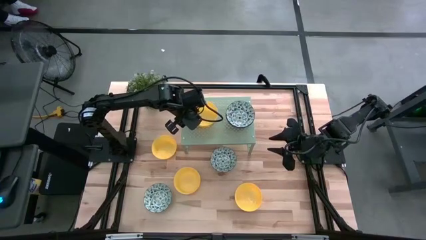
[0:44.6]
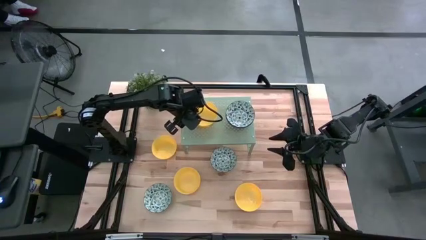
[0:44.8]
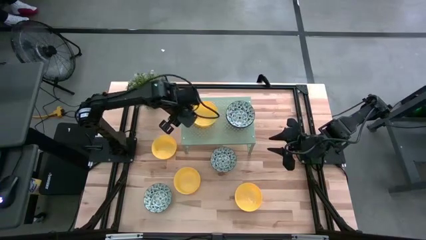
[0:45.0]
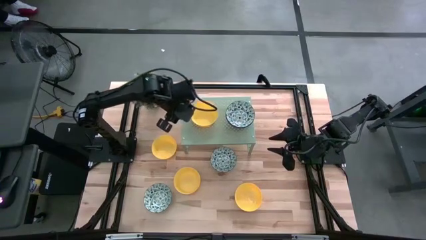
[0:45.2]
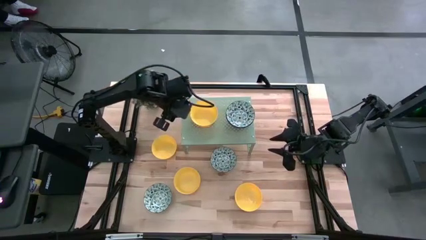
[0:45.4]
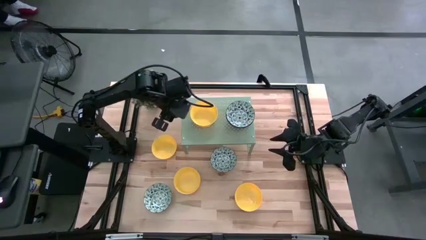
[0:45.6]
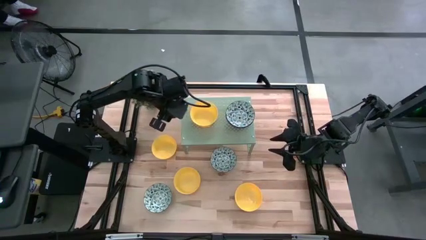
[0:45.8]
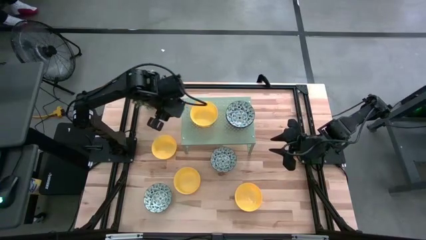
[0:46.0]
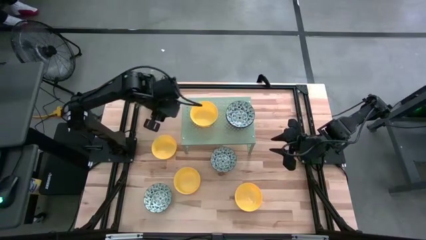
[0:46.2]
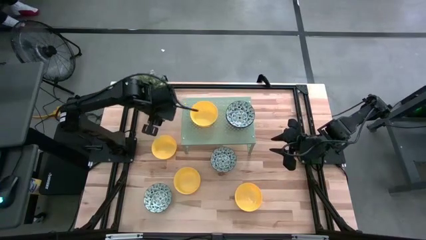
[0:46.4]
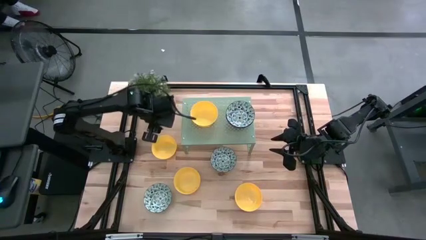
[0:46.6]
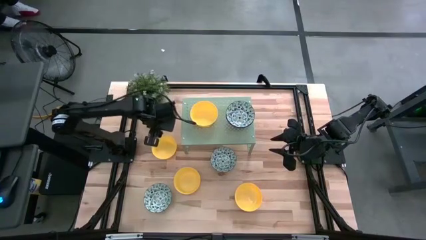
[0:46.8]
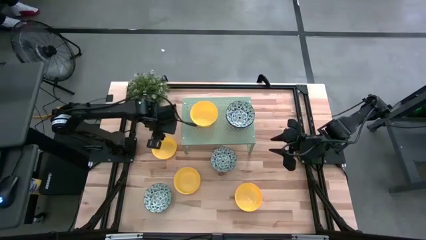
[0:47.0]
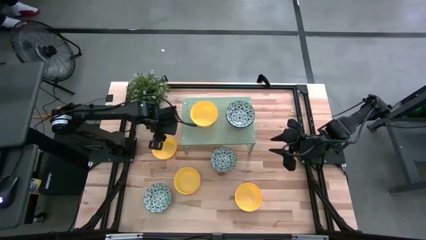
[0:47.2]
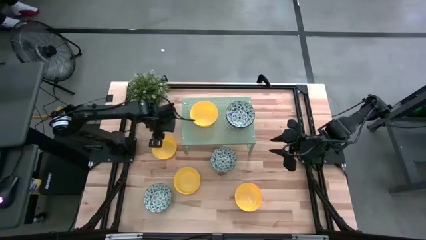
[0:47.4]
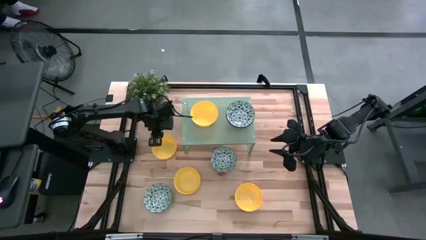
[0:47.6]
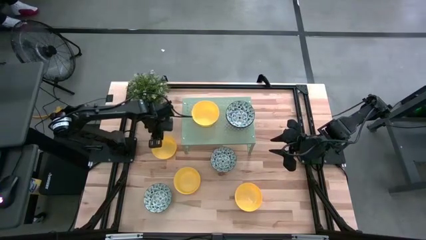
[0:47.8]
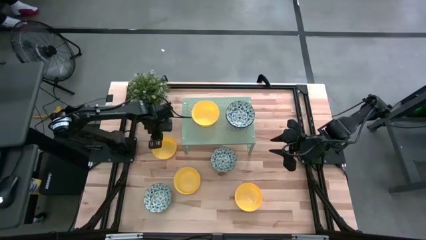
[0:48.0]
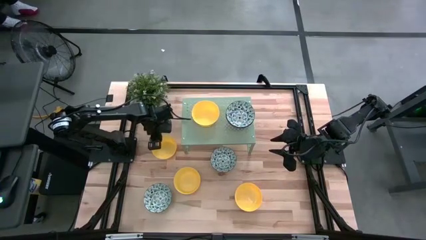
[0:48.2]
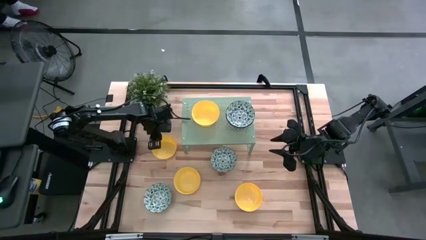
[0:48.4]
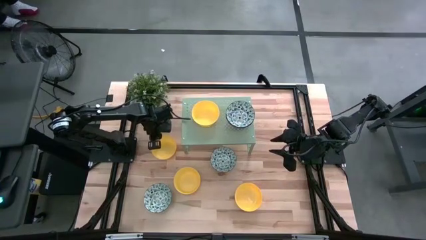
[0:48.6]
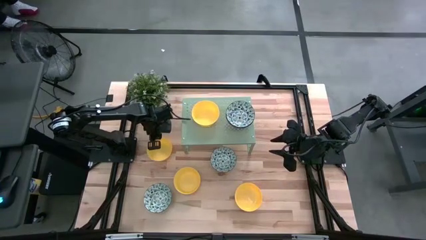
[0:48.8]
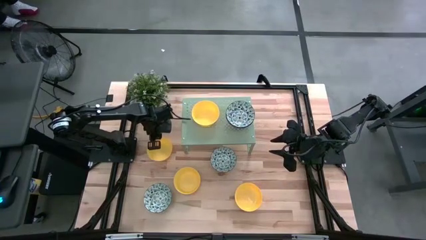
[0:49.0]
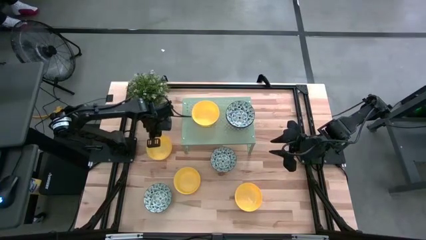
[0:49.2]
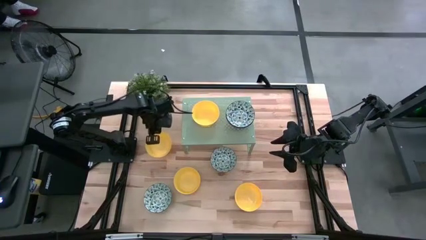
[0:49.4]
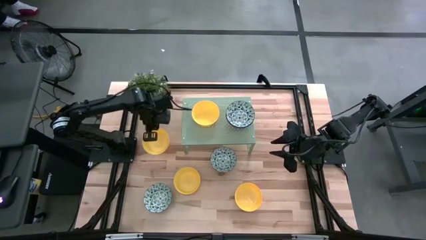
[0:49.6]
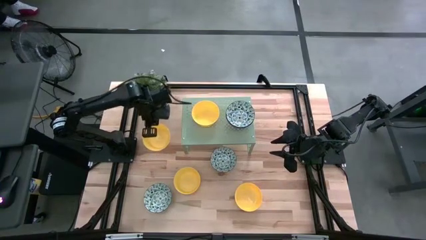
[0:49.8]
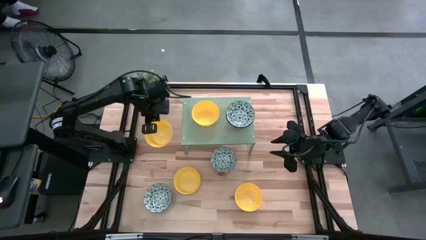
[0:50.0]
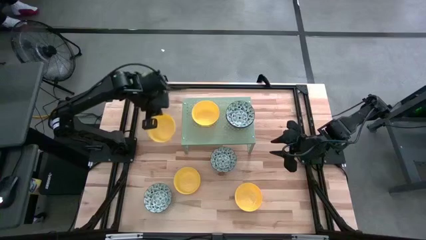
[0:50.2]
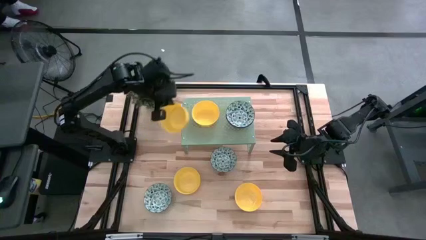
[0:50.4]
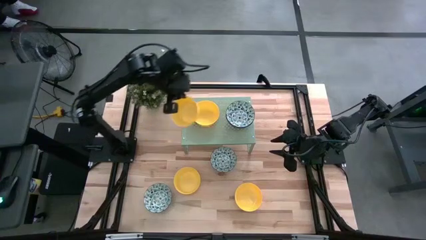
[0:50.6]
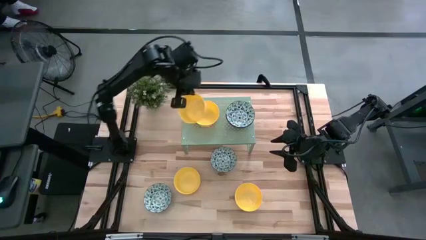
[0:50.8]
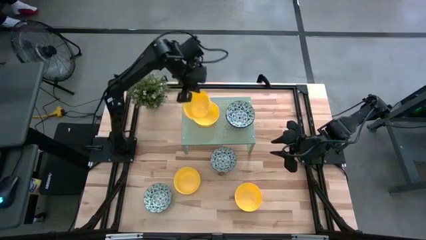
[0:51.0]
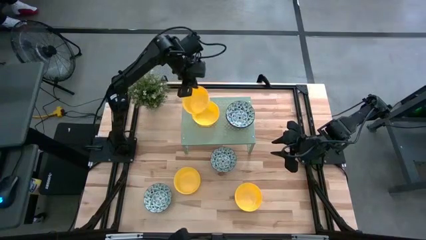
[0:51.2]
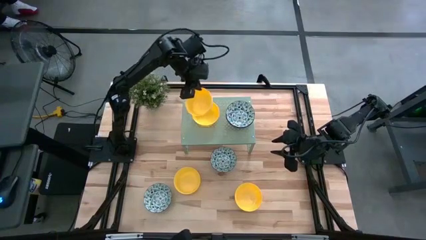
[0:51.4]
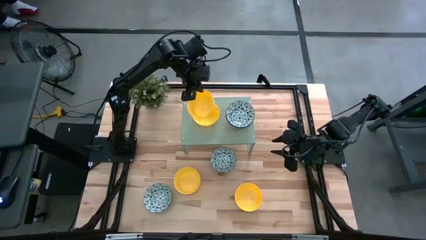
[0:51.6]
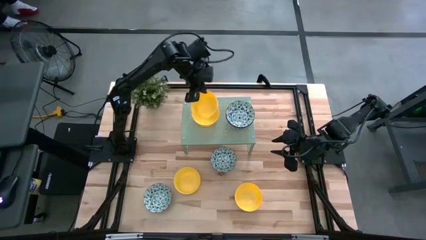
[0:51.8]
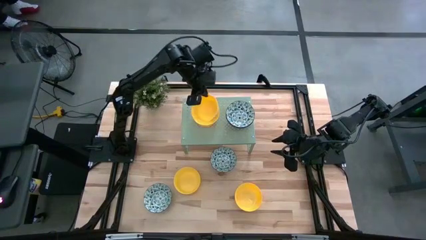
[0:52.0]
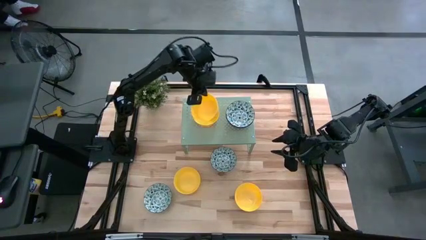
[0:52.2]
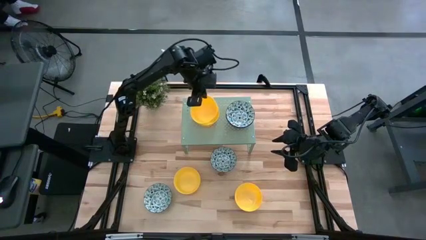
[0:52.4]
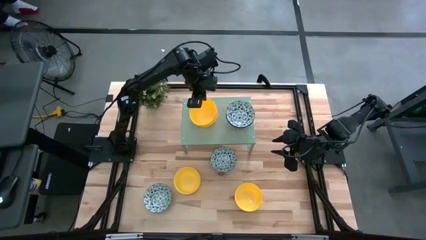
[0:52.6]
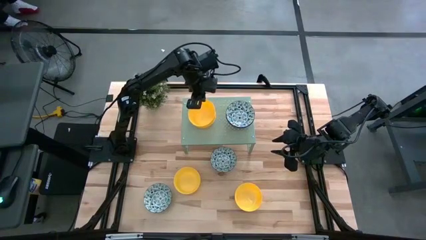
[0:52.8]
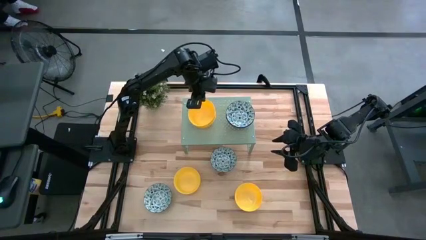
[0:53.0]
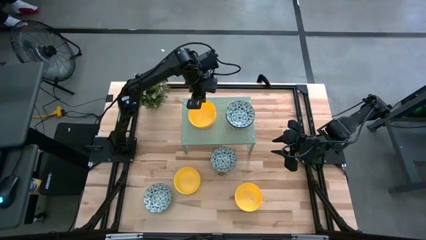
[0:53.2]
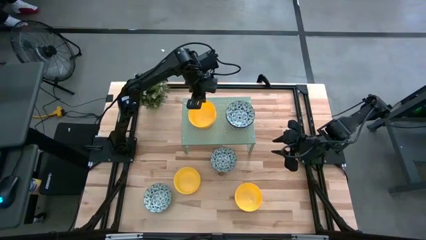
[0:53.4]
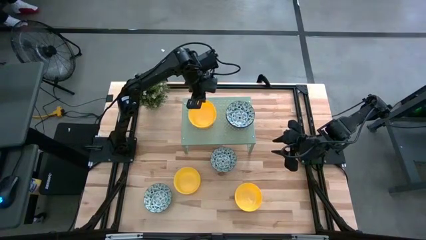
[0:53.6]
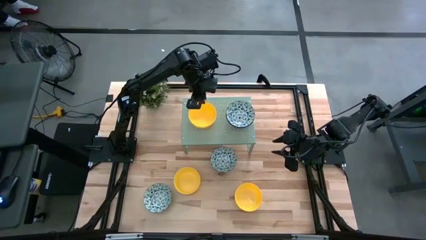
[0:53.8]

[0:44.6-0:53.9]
Task: Pick & Place Mini bowls
Stack the top left yellow bowl on top of the yellow bowl on the shelf

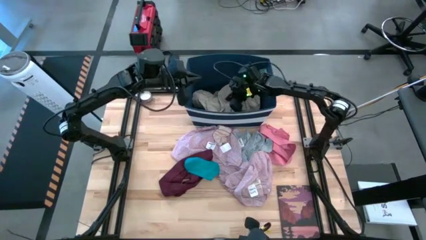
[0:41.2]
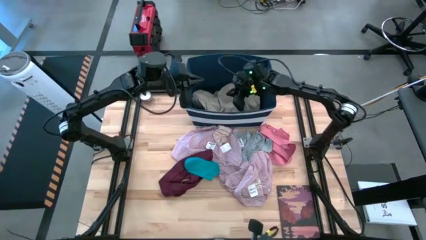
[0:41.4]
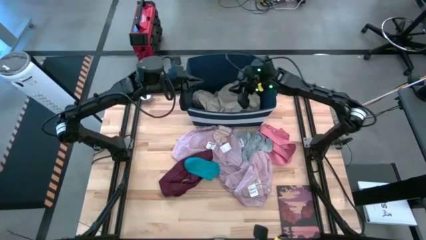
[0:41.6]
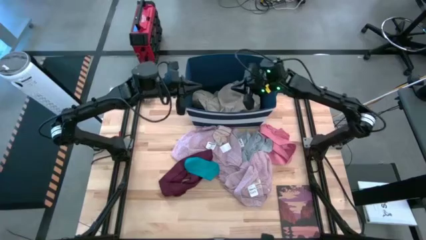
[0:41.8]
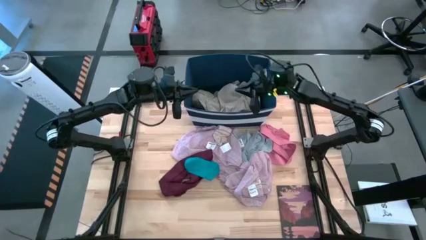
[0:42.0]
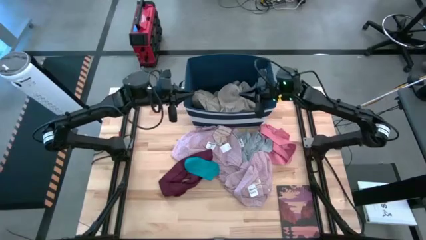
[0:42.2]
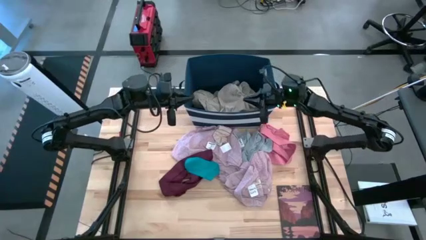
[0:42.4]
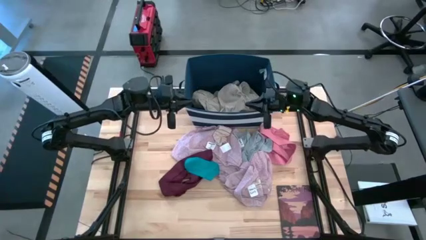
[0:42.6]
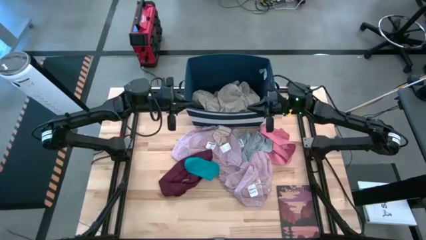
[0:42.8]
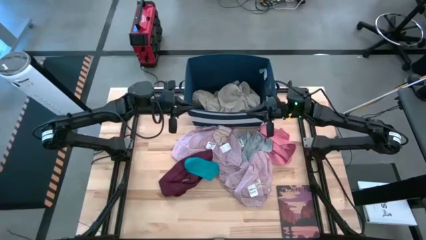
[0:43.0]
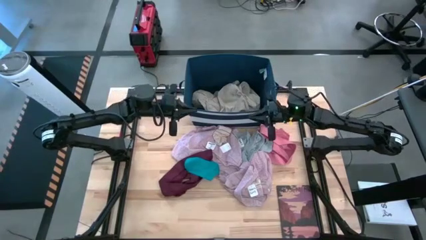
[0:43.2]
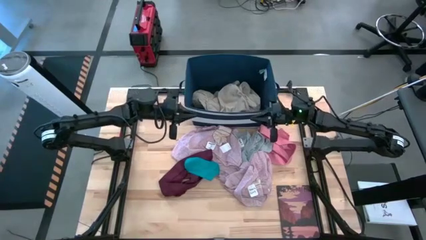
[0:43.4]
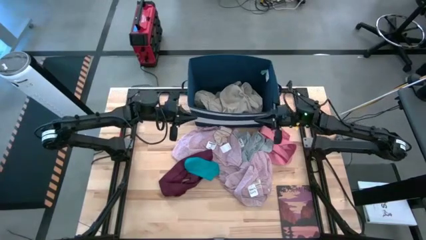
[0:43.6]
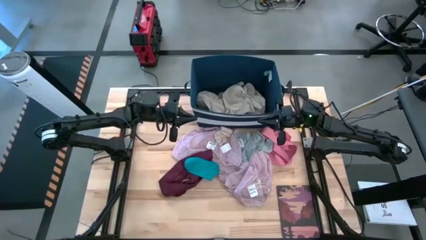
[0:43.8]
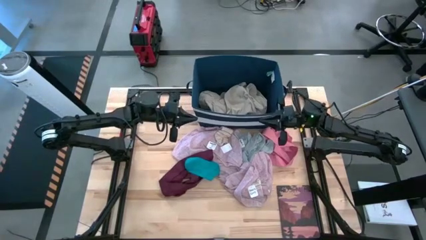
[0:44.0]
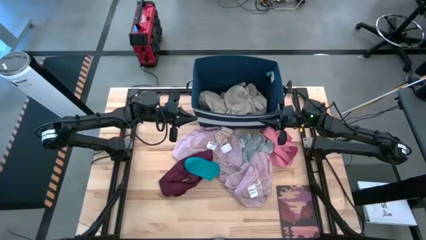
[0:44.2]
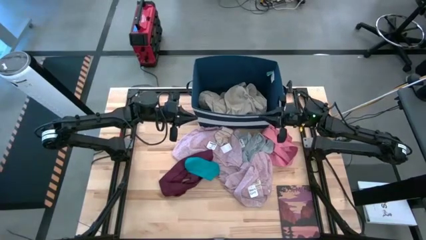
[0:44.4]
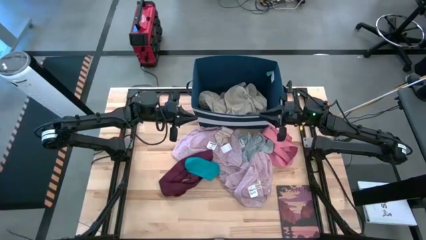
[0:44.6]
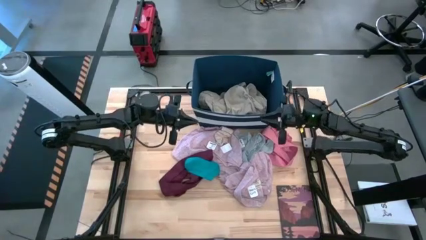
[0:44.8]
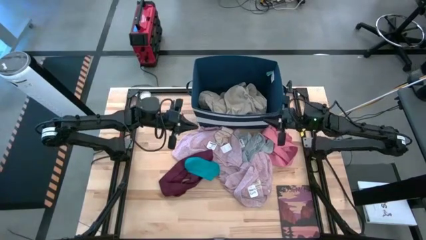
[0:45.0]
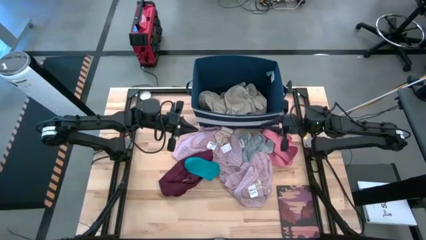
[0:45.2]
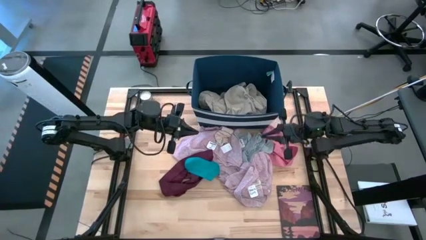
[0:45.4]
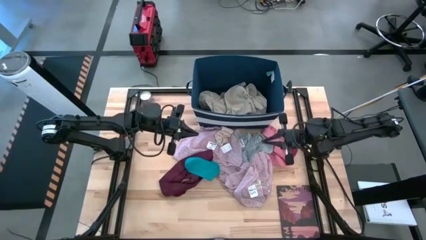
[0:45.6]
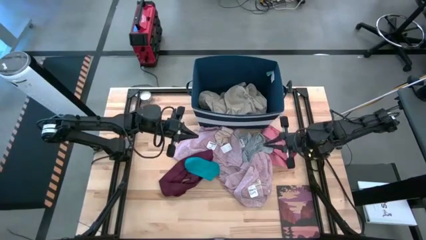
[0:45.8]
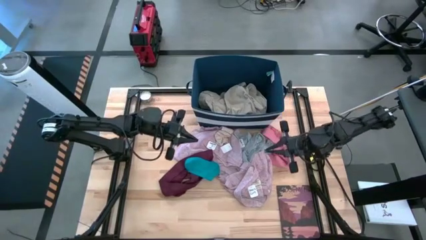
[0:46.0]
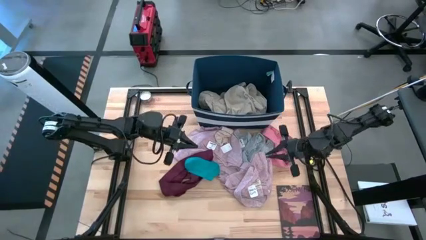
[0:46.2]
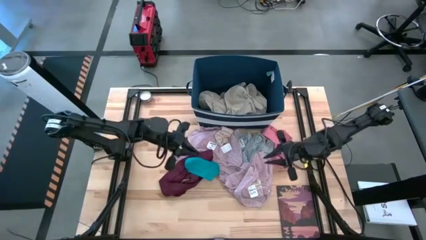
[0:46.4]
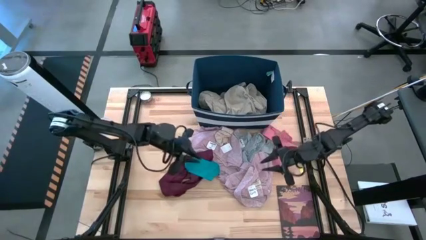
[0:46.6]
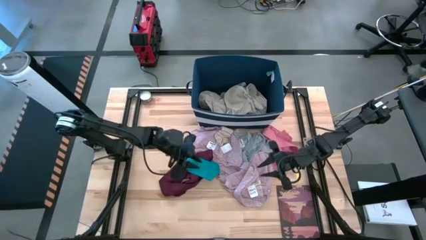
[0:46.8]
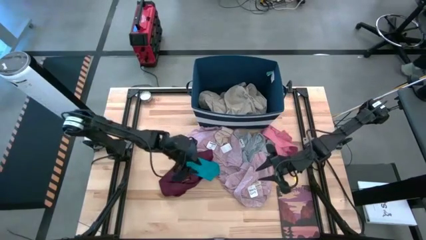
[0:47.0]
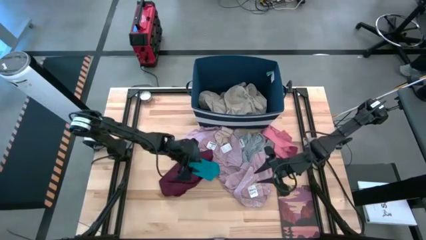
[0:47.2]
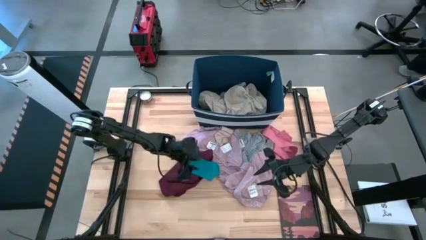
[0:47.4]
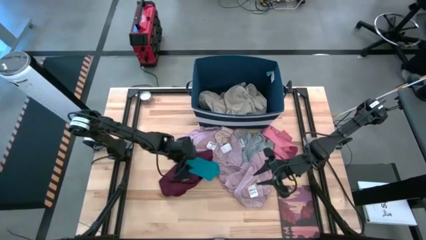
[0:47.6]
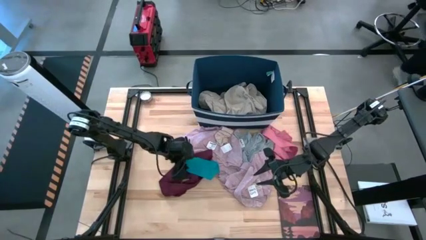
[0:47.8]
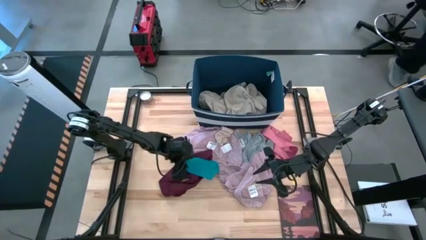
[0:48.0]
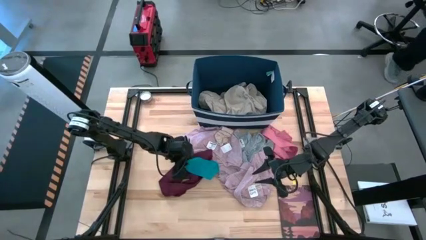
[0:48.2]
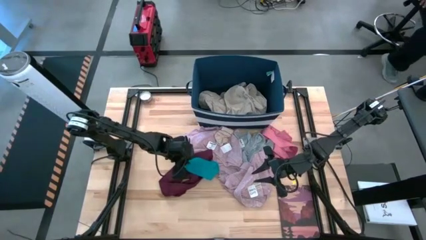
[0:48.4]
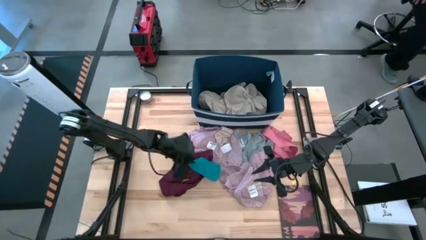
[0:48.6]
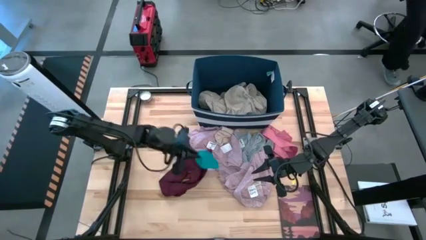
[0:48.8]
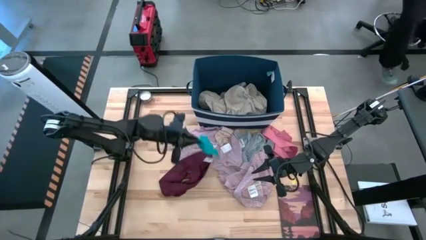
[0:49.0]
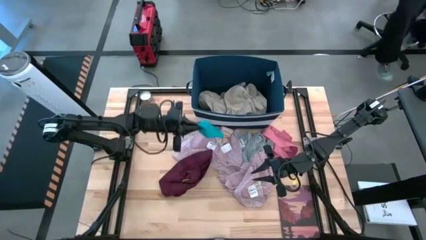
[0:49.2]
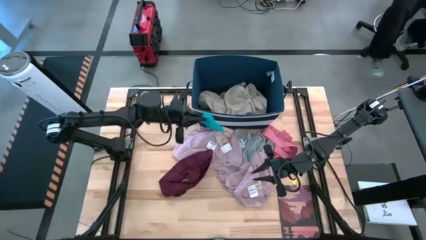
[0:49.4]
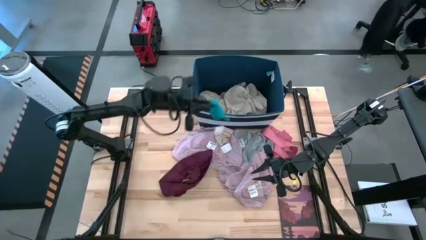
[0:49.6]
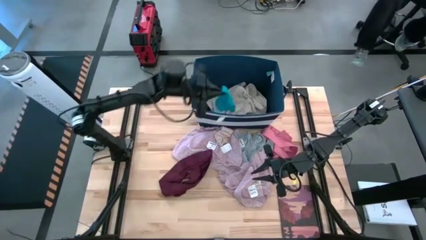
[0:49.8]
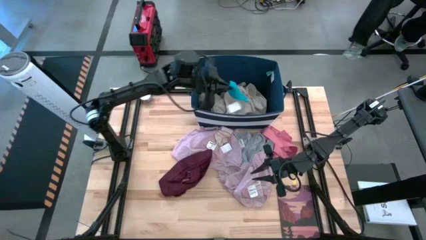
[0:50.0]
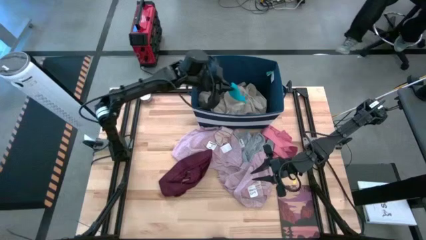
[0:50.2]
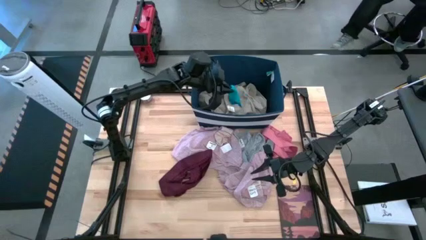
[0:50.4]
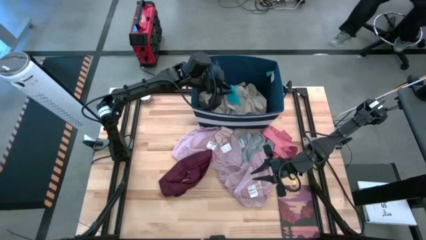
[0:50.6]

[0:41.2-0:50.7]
Task: Sort clothes
Put the blue sock into the blue laundry organizer
